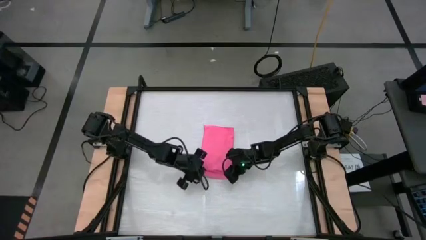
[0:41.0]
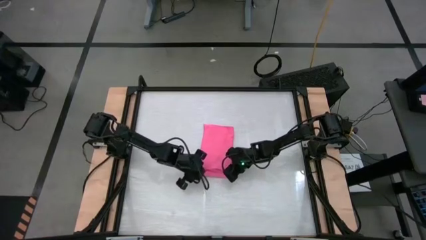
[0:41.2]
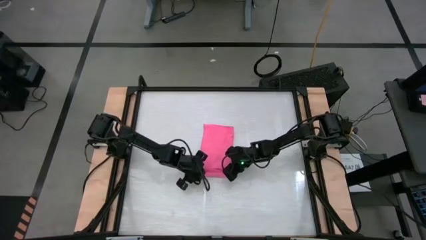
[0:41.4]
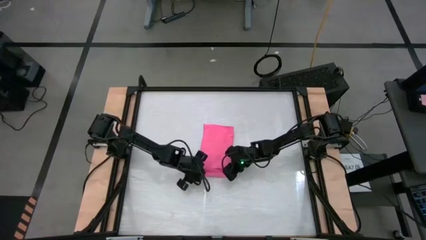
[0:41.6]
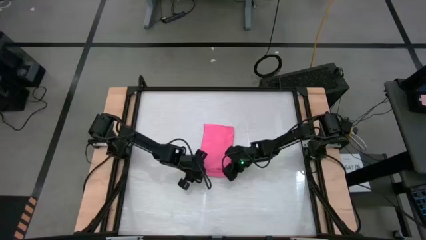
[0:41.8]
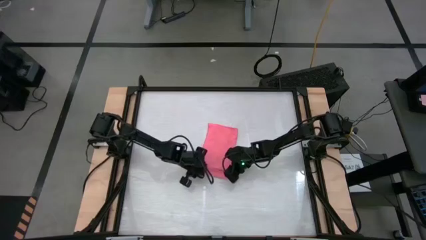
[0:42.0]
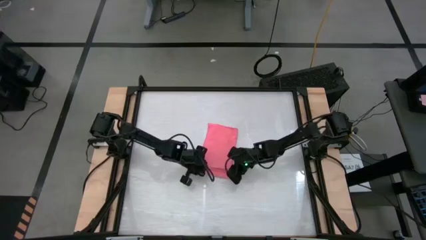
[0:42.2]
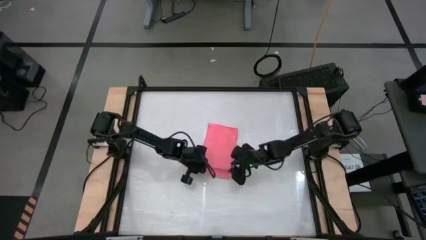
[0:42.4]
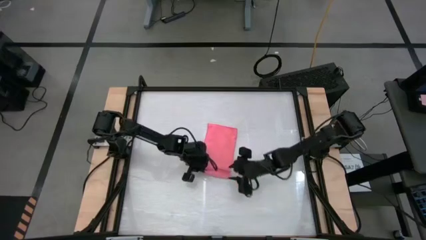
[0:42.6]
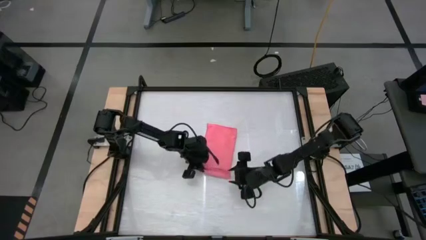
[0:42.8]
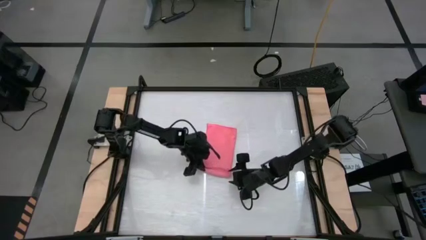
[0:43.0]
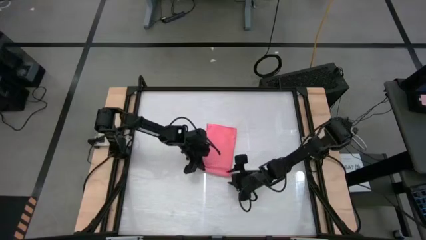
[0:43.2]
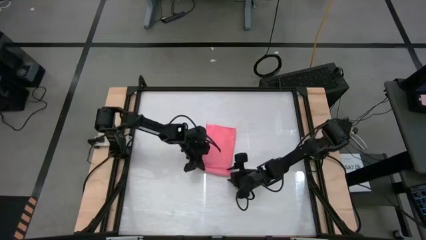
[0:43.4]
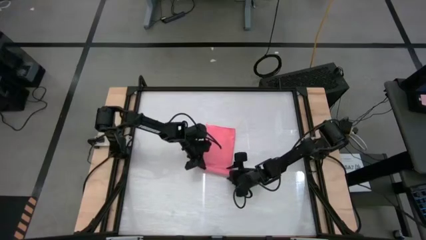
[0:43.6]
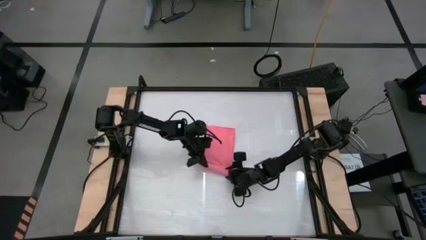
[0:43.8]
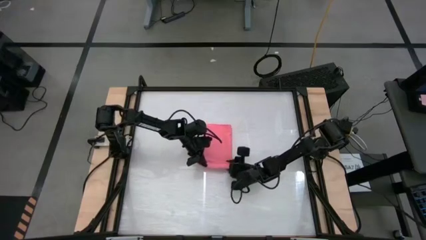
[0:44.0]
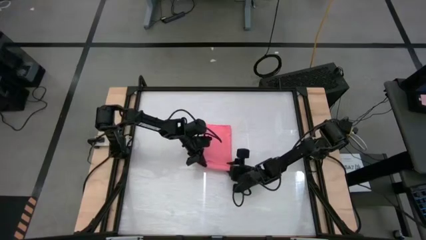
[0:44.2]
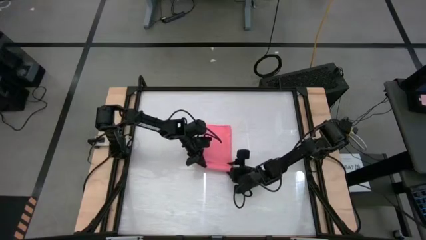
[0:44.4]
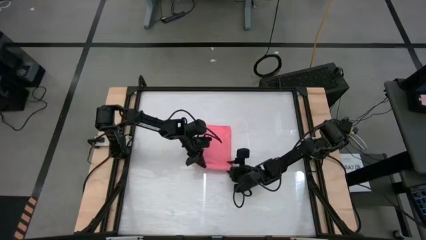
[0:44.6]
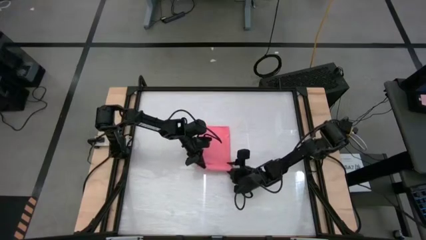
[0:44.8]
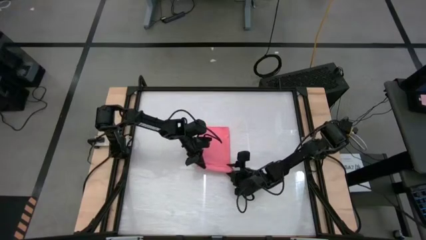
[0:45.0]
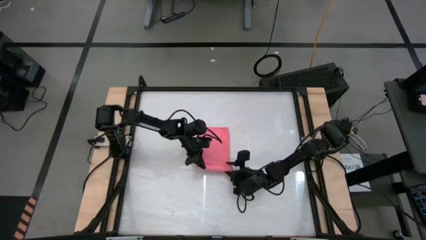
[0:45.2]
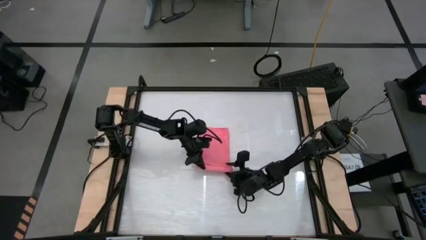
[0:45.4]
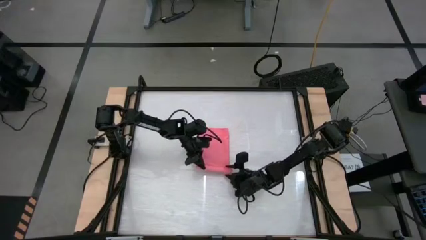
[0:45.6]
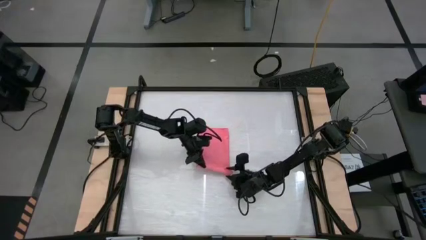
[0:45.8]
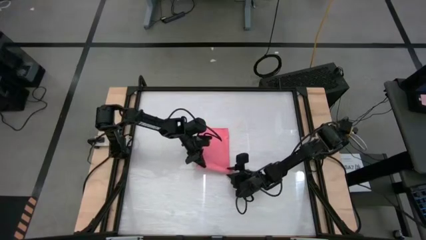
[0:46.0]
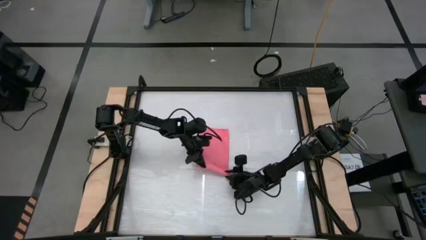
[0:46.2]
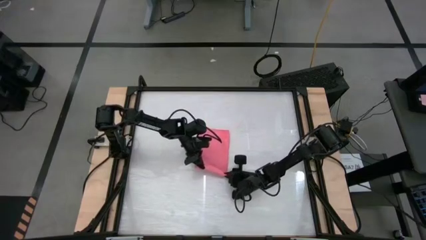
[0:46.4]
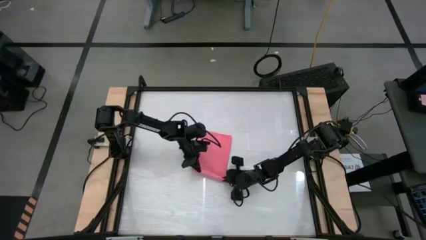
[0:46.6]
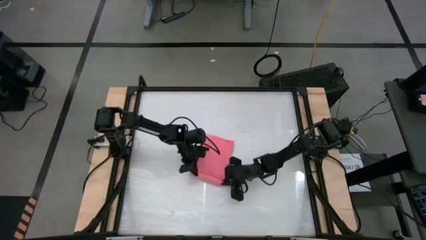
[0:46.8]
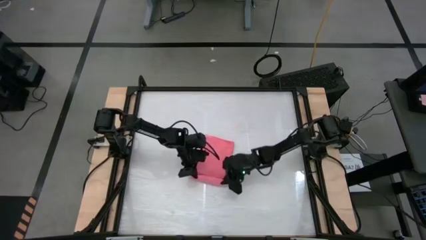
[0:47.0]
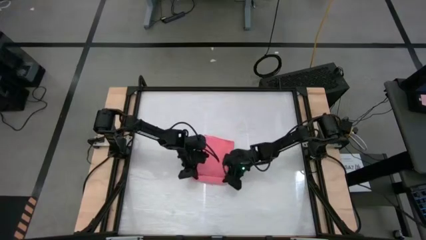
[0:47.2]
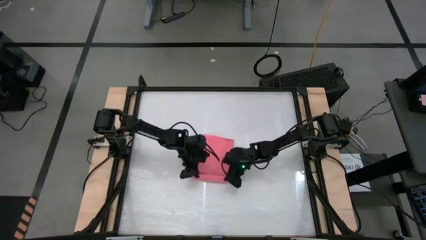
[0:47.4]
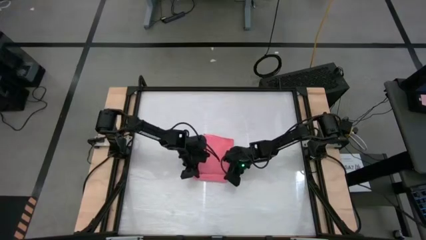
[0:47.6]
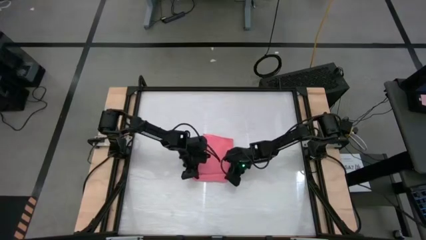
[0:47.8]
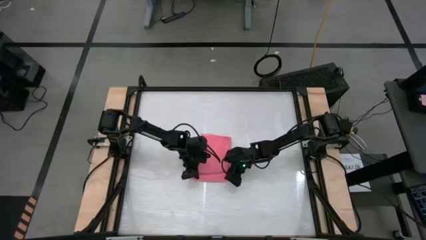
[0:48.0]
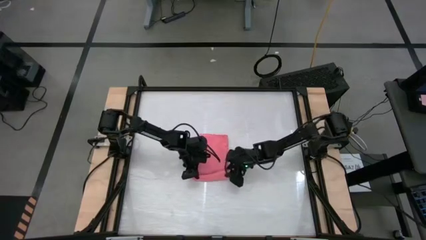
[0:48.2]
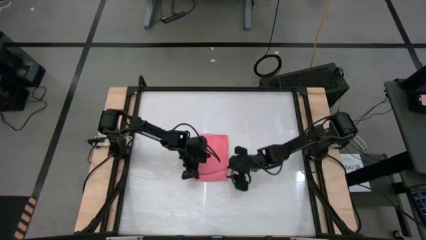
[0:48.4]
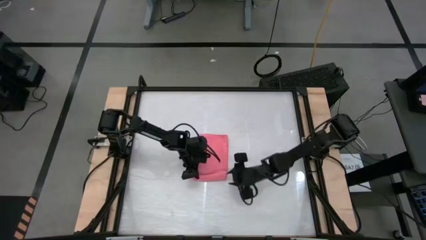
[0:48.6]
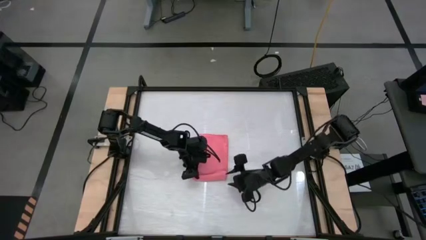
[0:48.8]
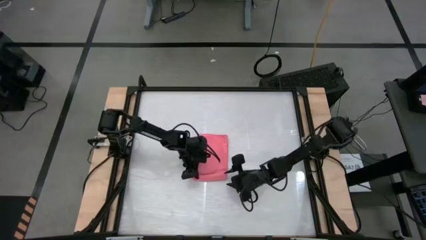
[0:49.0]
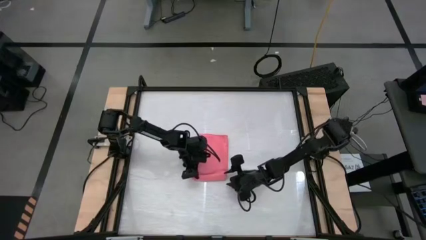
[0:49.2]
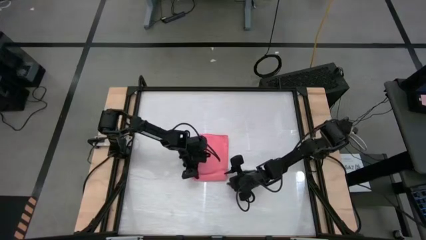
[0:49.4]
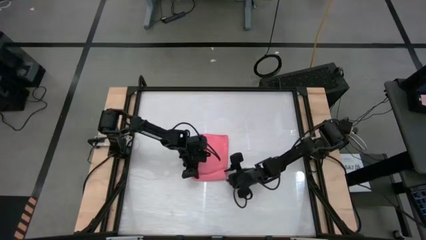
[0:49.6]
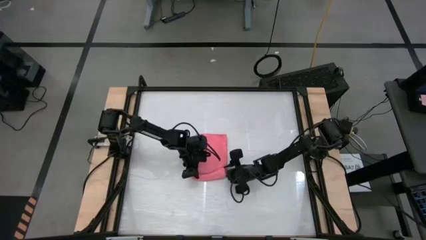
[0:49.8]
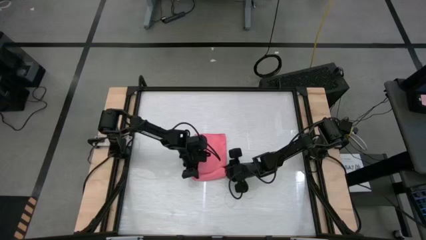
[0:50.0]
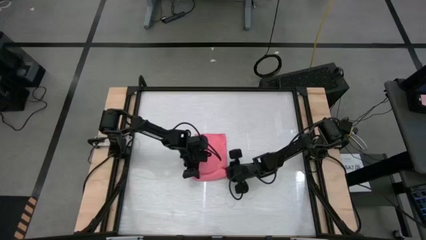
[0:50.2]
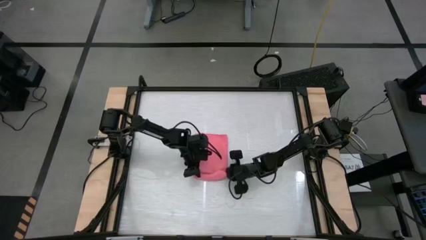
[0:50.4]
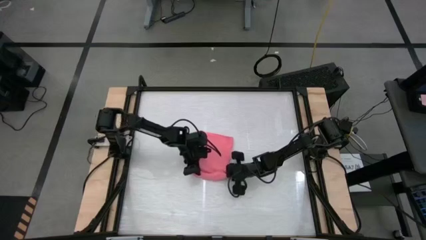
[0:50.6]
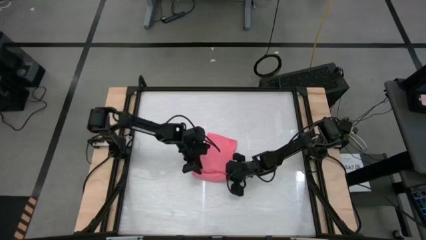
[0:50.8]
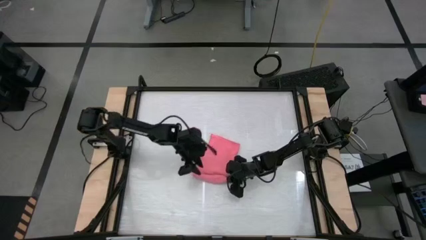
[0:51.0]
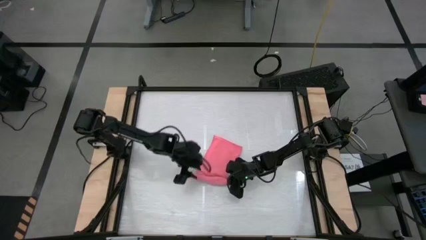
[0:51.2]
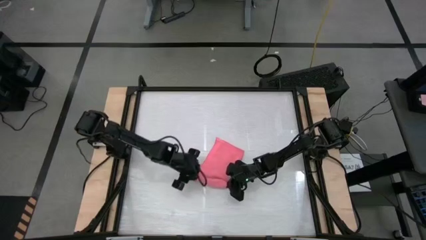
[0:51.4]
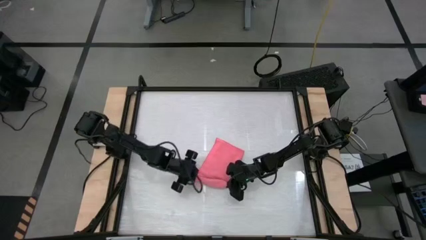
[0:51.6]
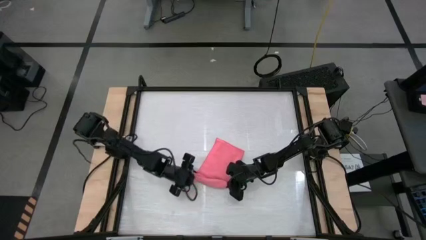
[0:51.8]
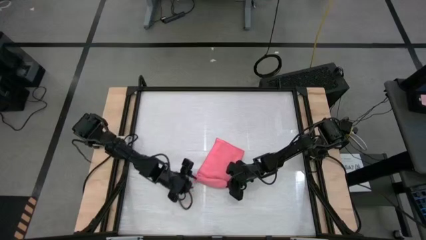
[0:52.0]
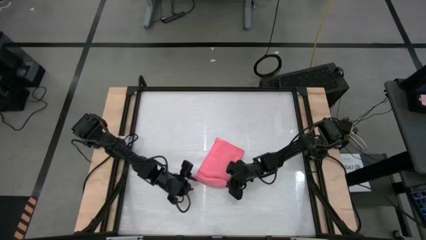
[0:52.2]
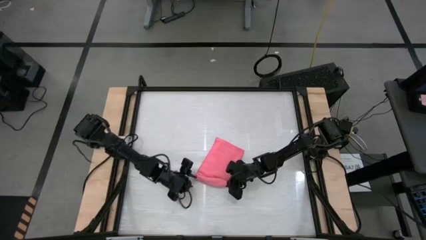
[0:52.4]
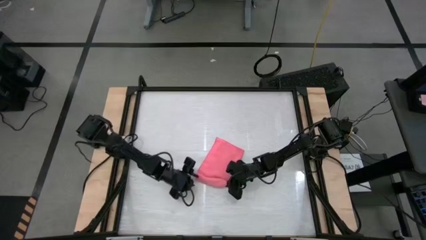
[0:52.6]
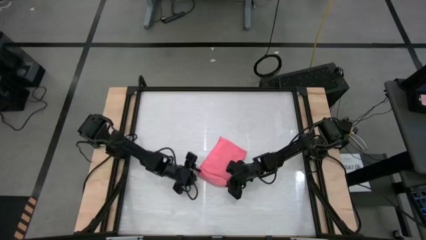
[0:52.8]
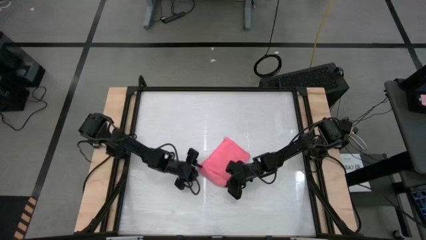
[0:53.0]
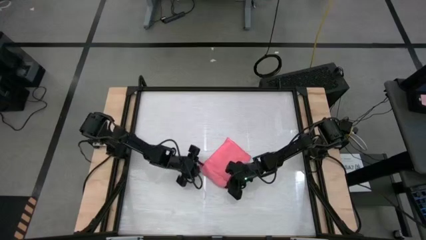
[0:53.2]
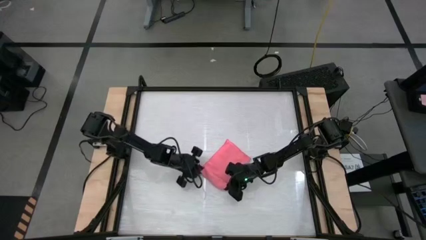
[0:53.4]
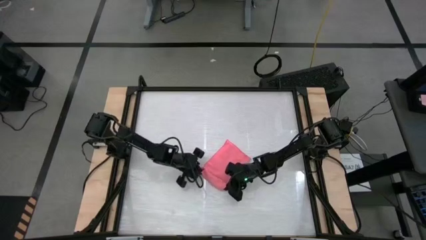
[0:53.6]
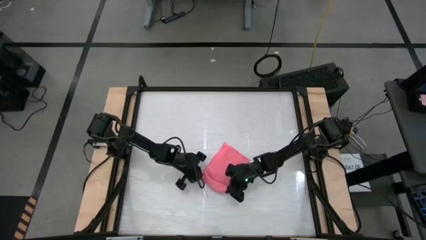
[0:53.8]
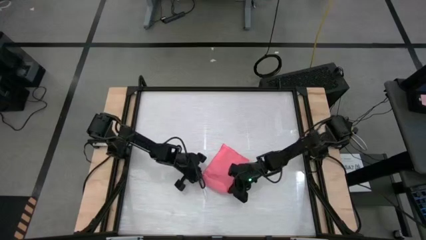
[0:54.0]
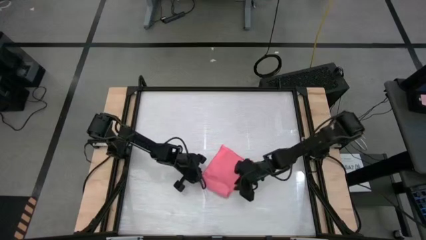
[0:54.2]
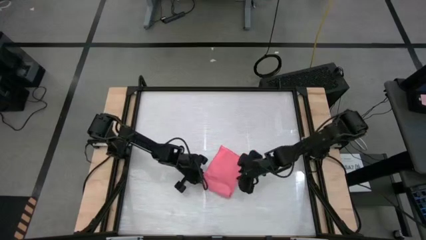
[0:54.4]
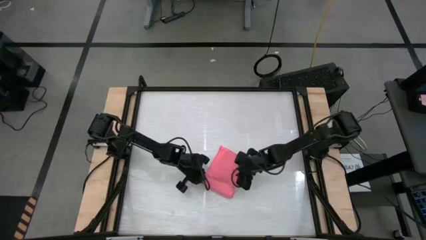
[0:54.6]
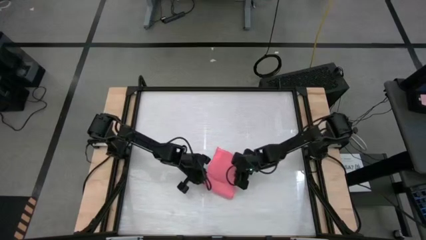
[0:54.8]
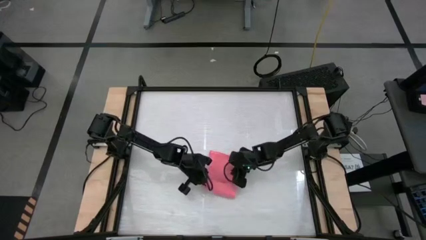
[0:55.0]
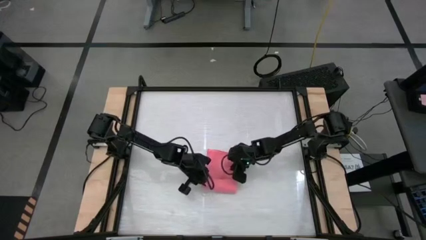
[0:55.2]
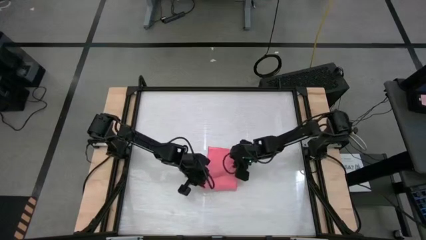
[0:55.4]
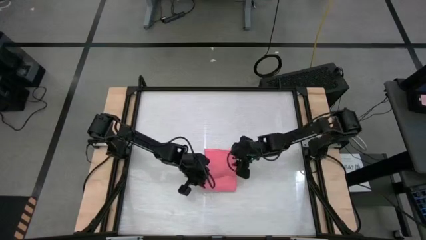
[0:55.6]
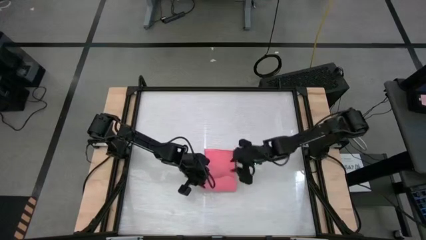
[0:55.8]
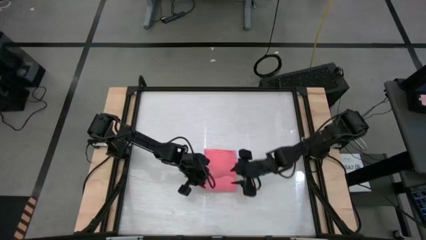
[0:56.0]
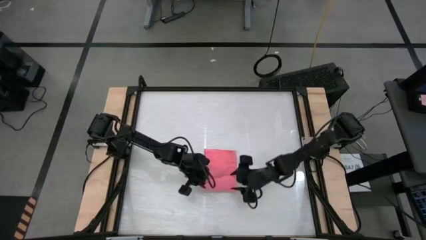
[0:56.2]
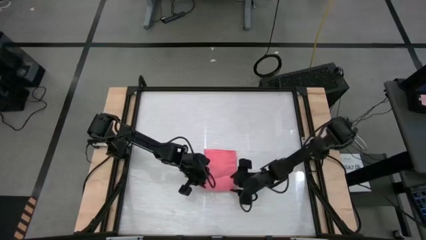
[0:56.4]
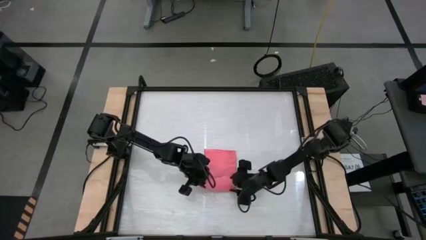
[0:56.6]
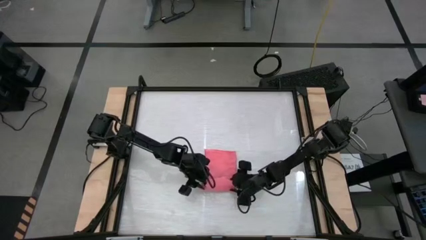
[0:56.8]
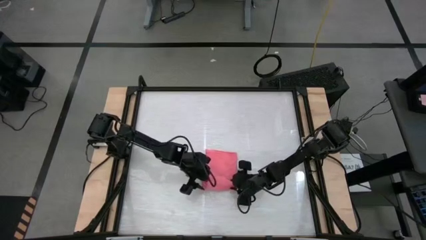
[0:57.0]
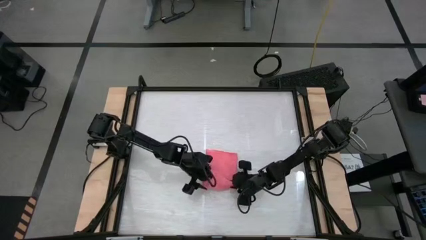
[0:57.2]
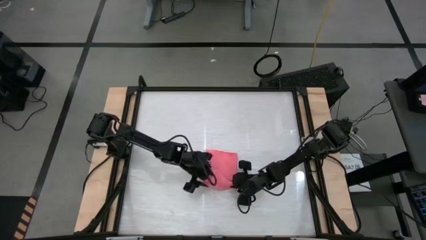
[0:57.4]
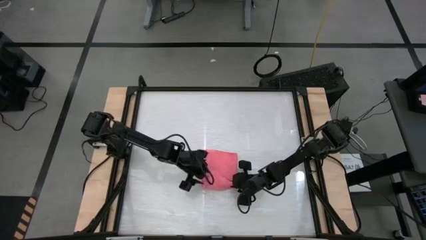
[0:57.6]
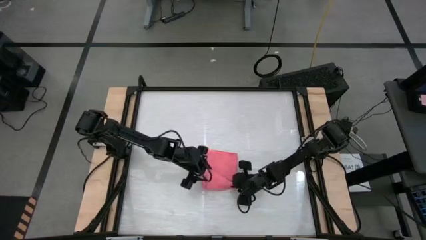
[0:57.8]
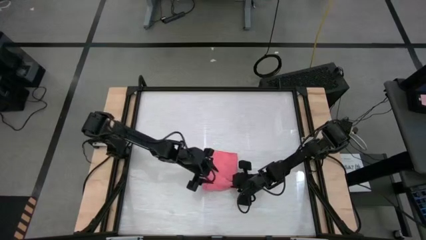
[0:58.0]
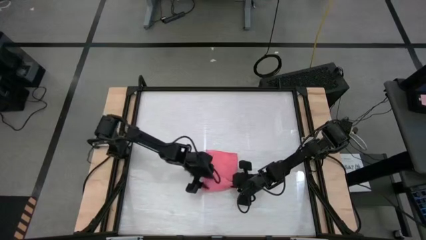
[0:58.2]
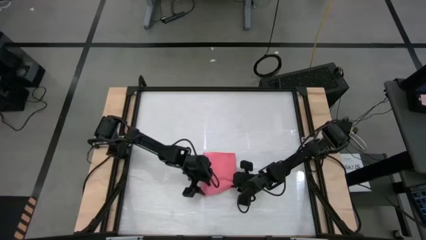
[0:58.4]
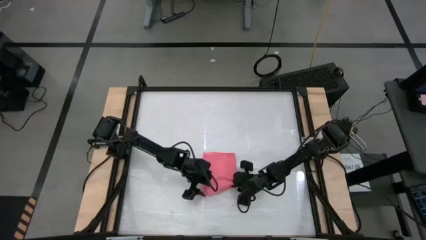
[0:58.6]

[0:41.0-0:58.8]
Task: Roll towel
Roll the pink microfiber cloth
